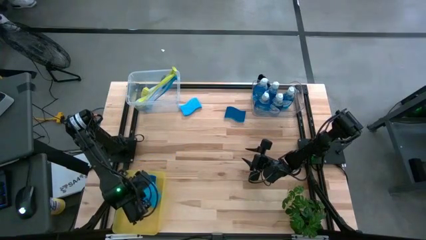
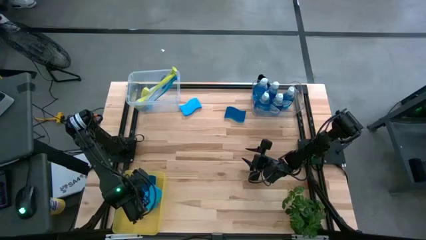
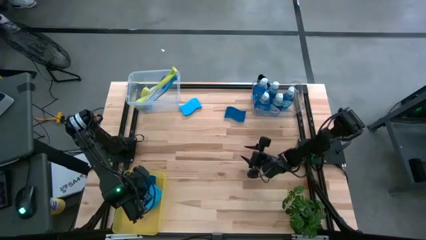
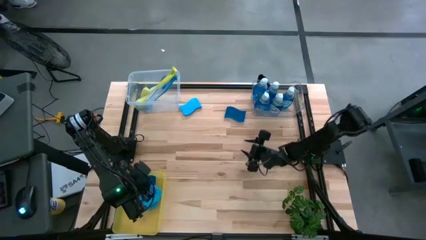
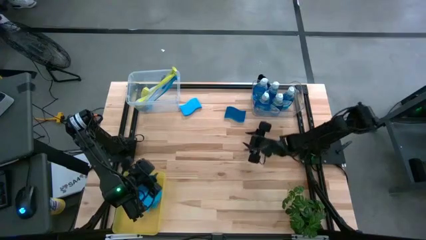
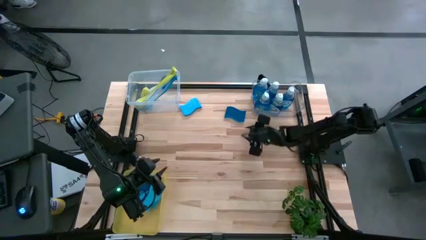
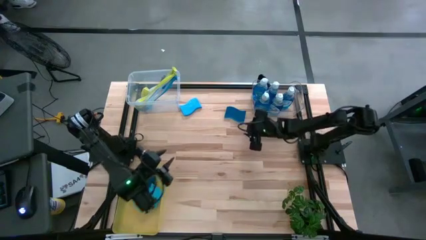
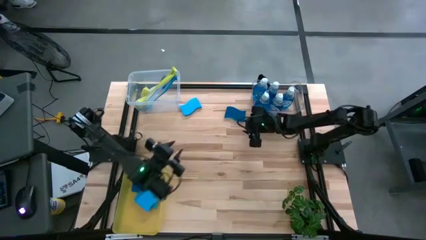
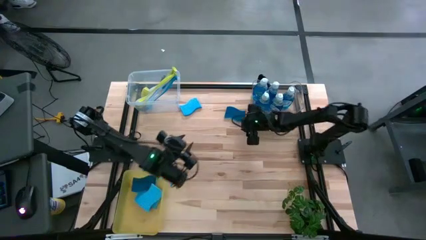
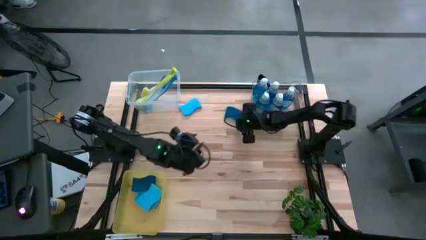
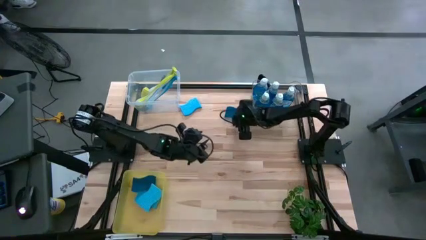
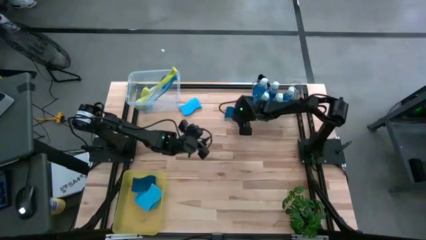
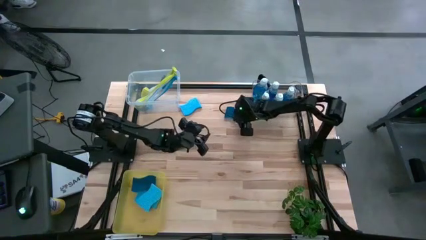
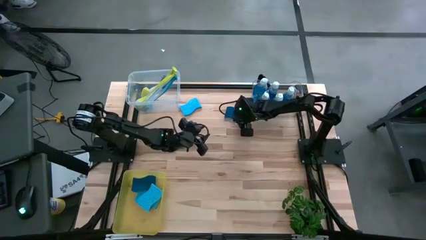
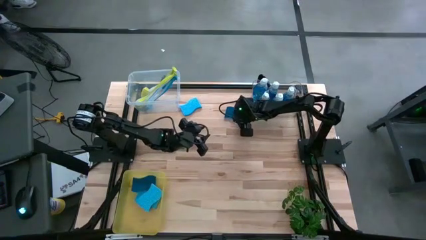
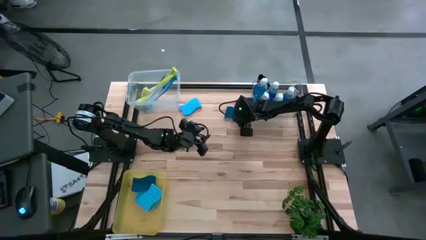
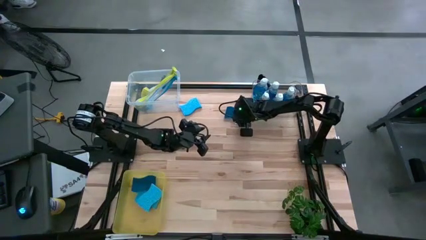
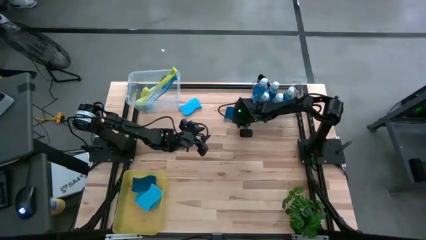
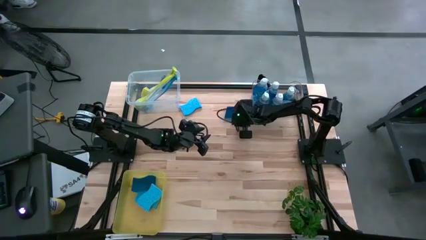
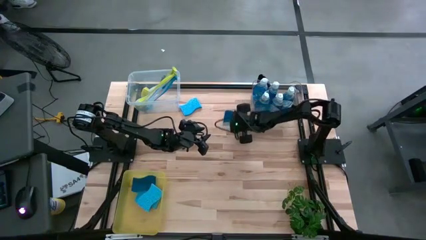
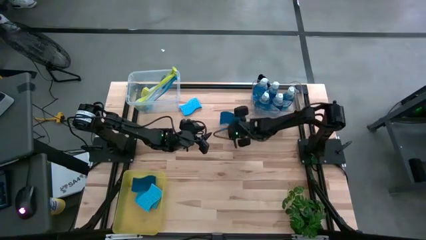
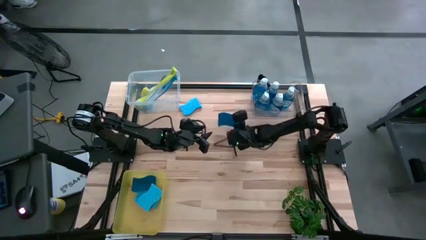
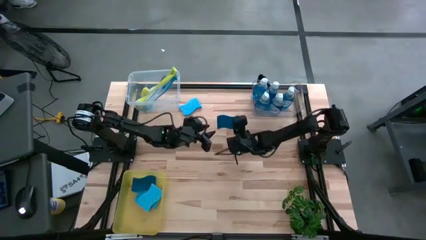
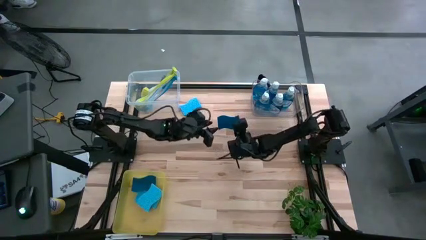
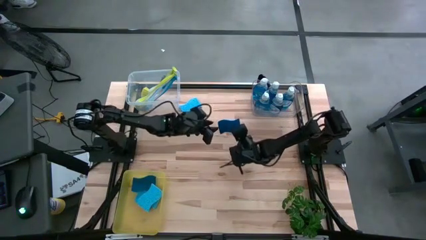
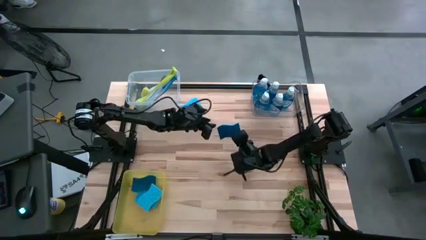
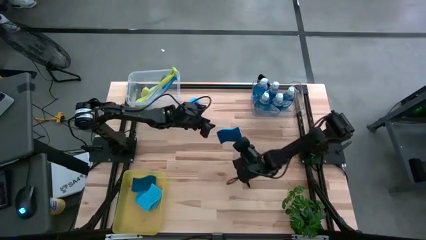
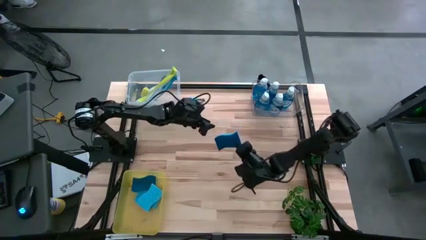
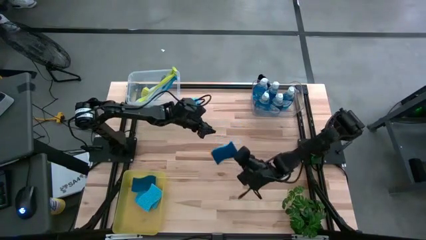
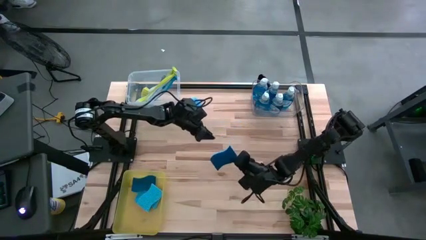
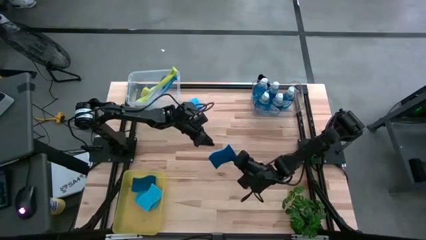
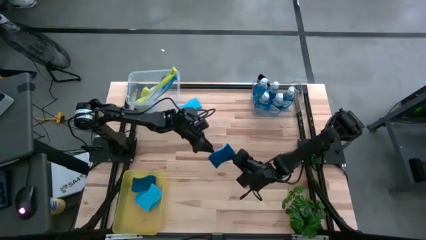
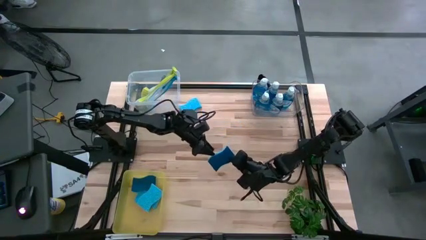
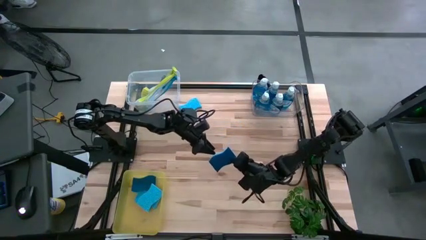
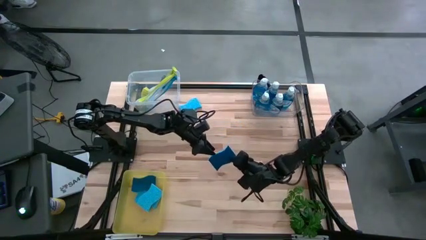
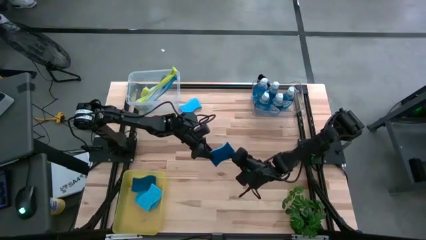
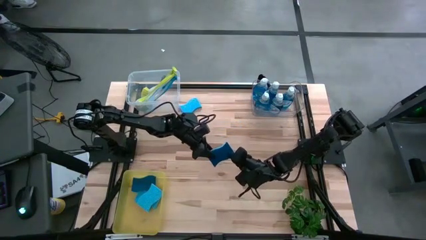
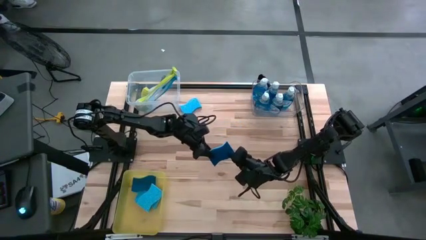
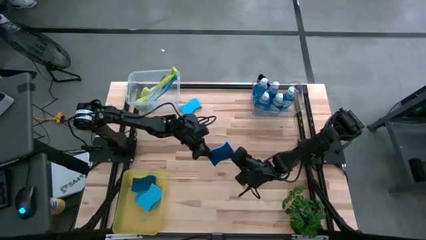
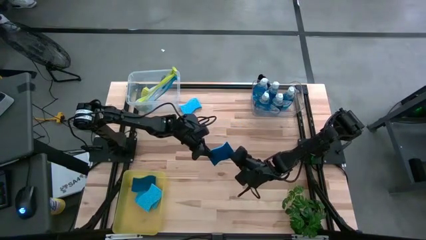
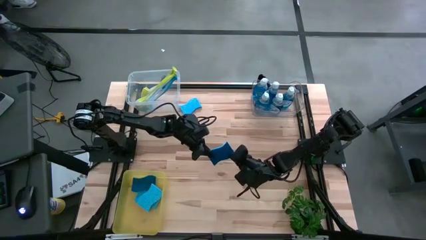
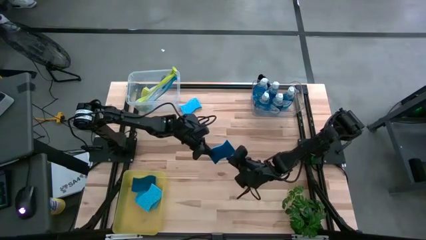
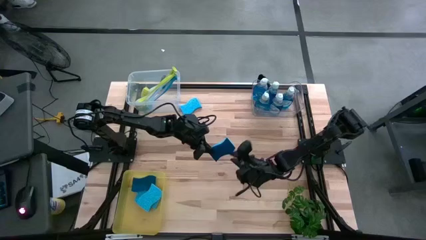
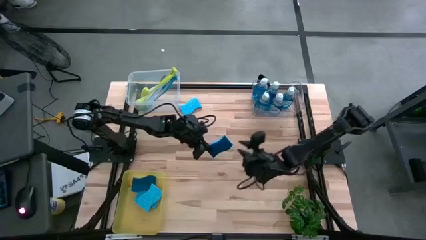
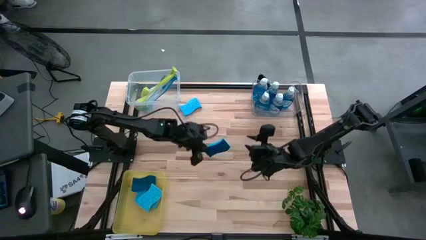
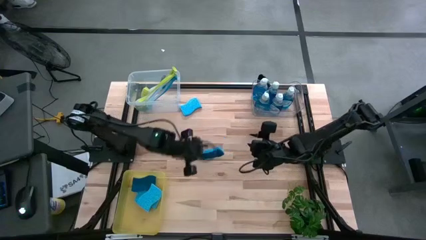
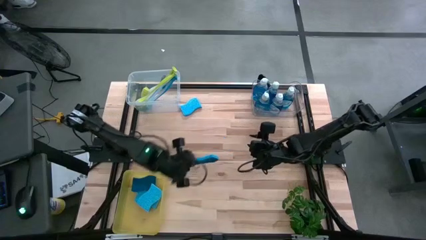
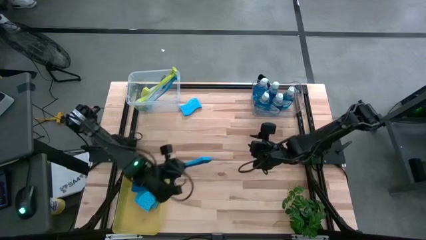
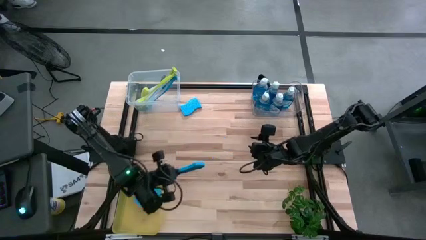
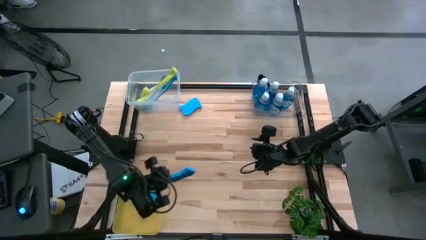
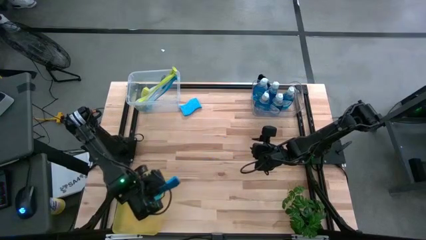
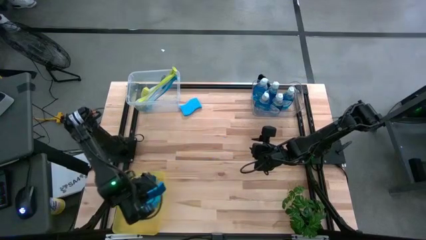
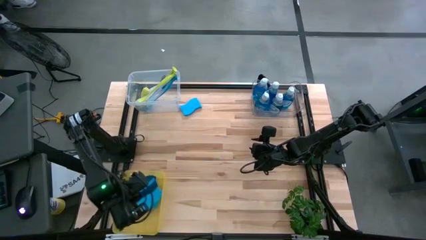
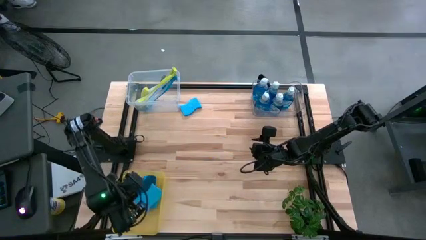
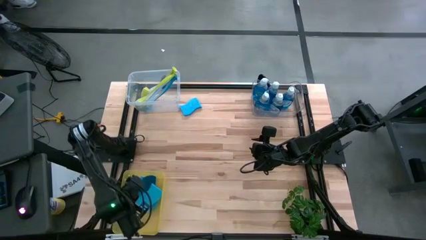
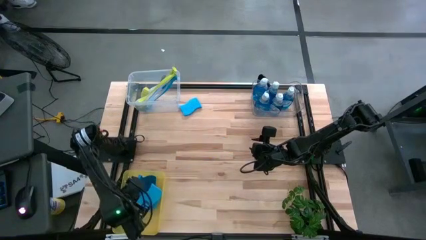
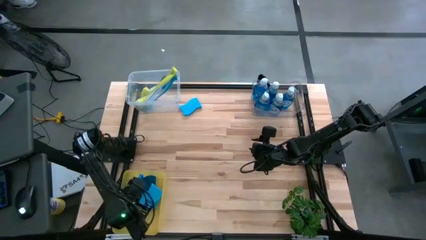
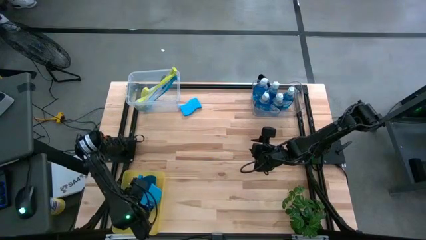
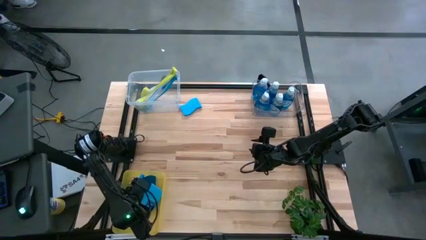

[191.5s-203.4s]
Task: Pick & Place Kitchen Sink Supplies
Put the right sponge into the yellow bin

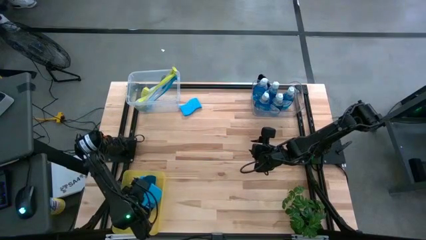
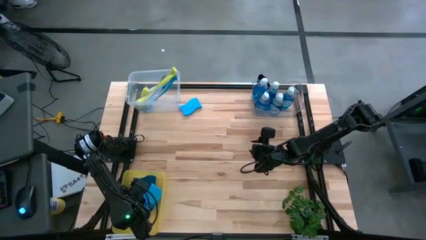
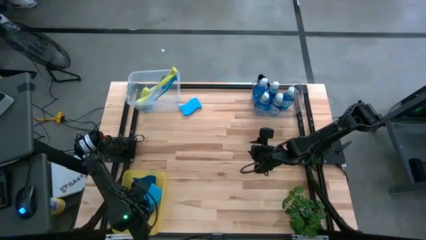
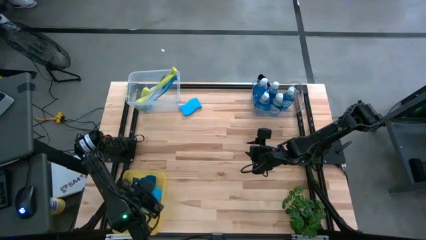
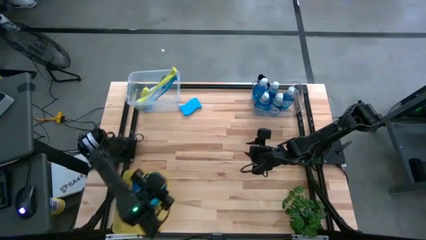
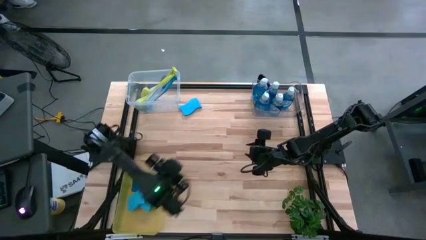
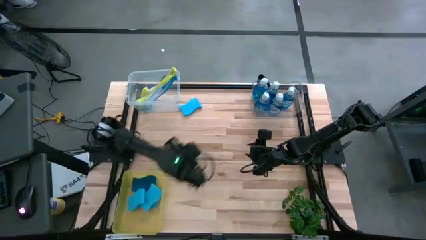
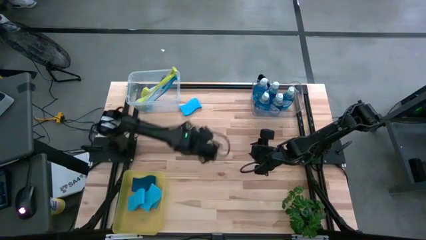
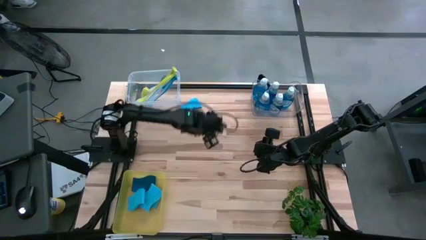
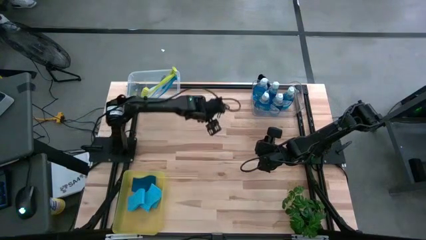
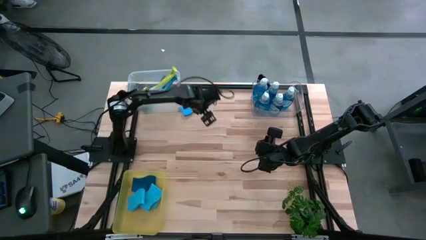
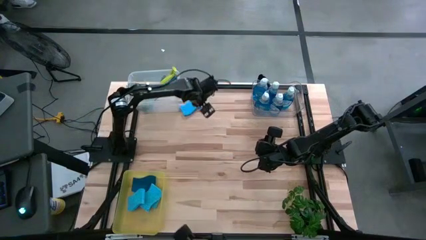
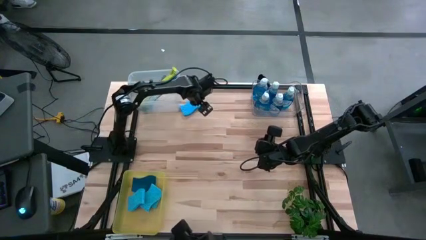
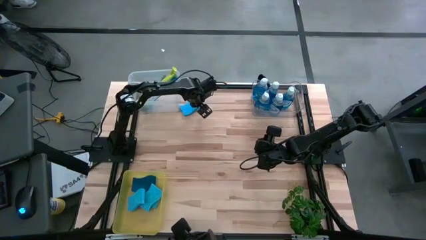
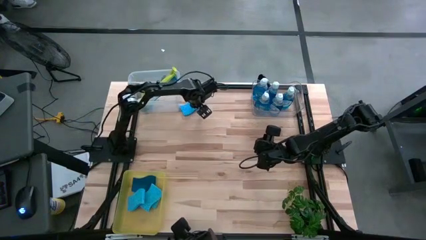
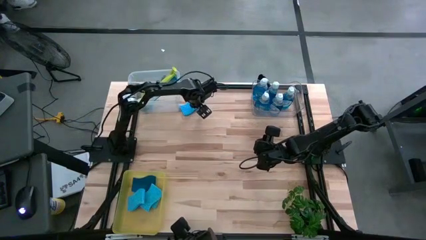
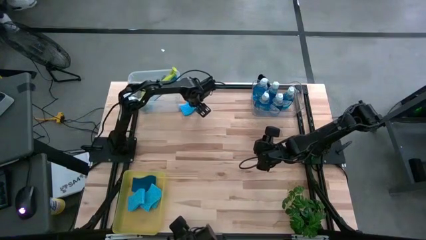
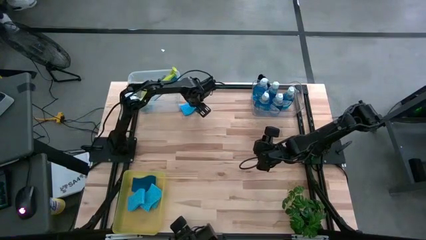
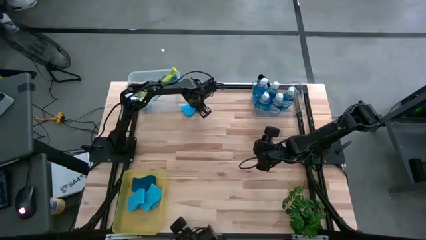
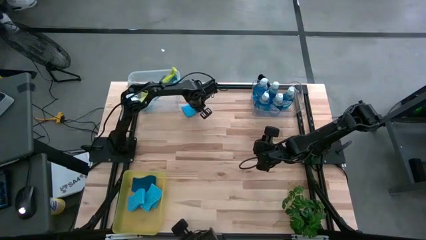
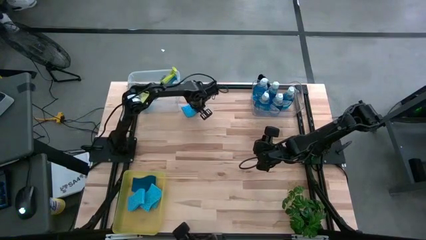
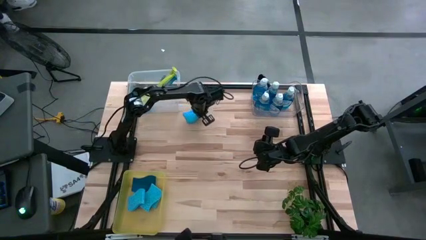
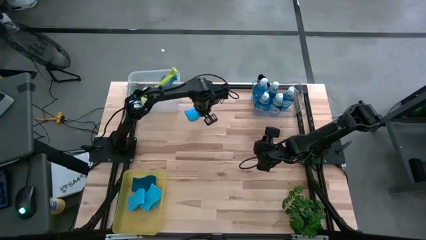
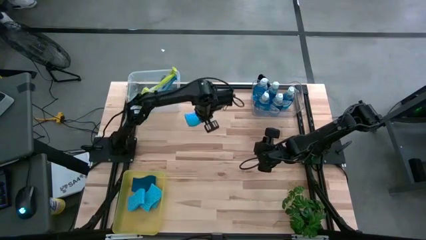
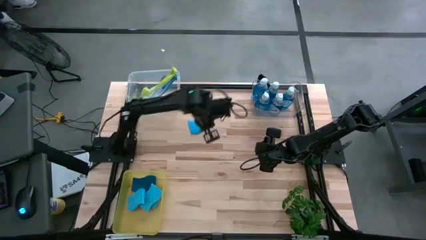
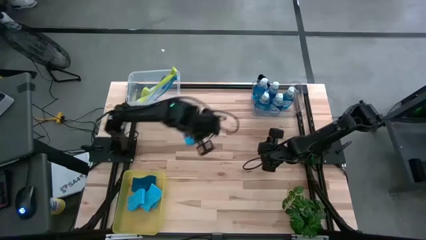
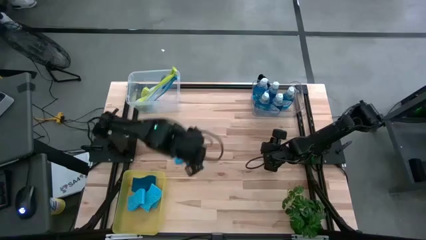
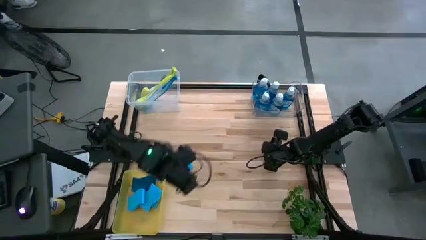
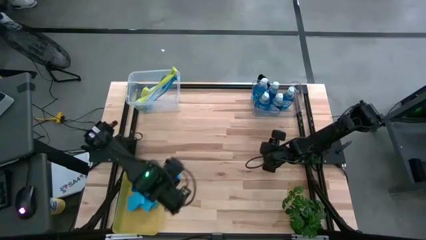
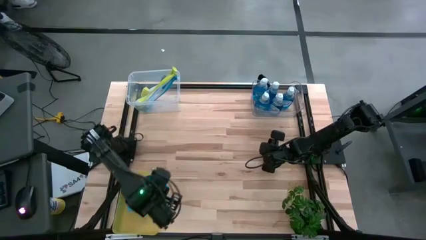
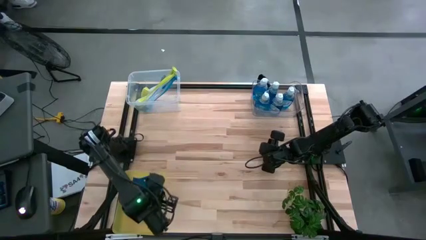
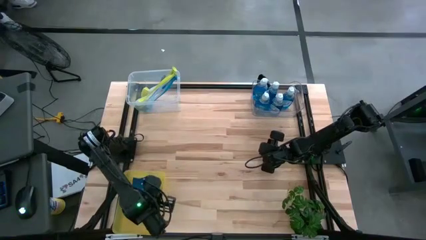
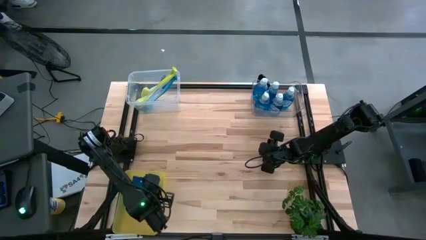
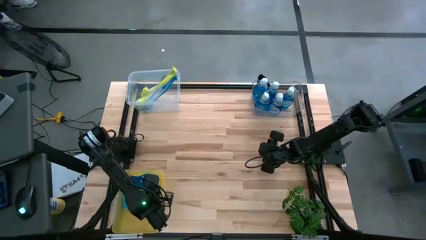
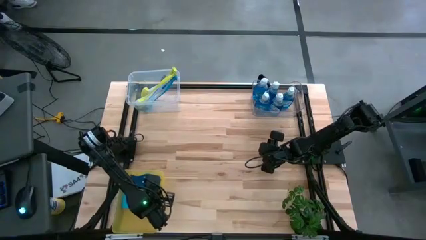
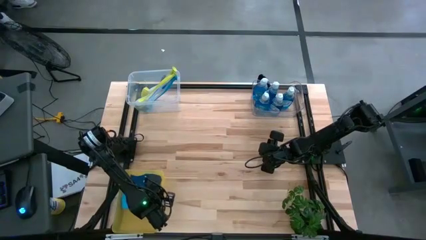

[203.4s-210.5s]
Put the sponge into the yellow bin
